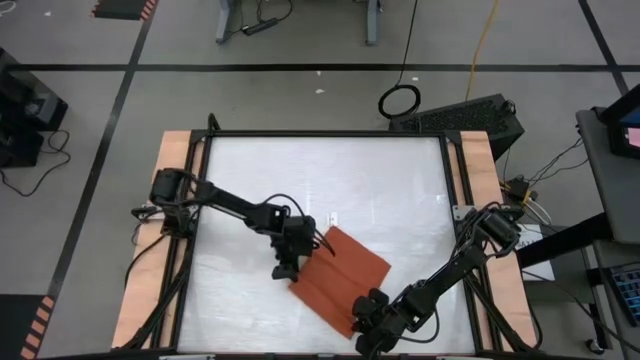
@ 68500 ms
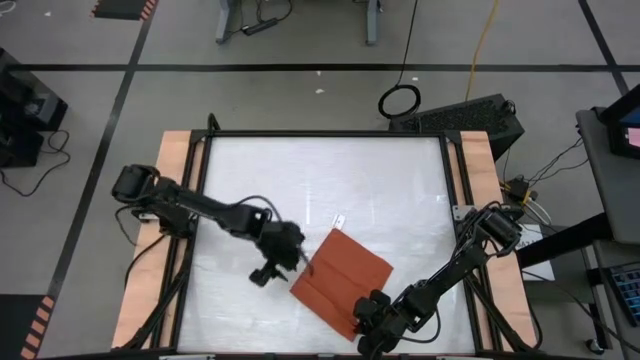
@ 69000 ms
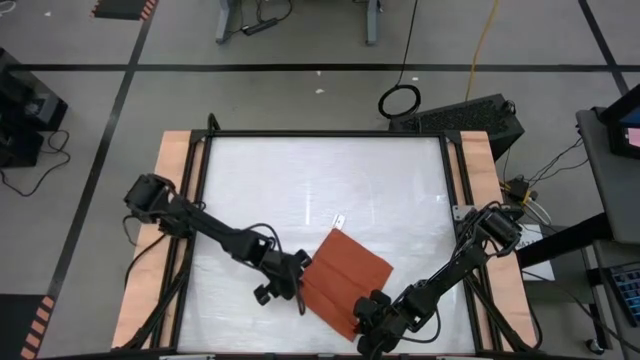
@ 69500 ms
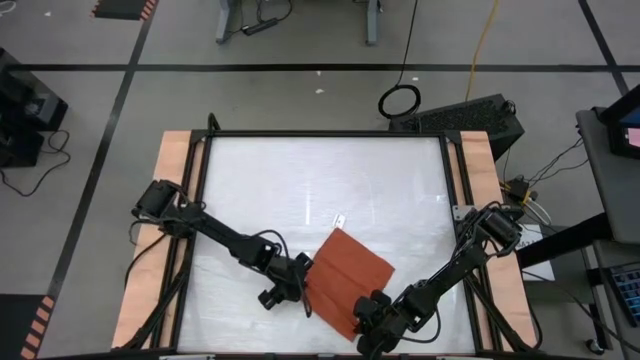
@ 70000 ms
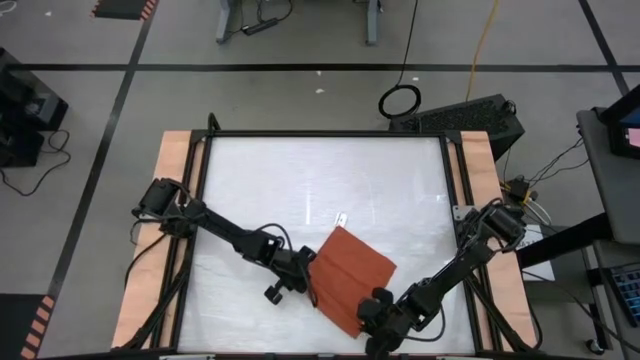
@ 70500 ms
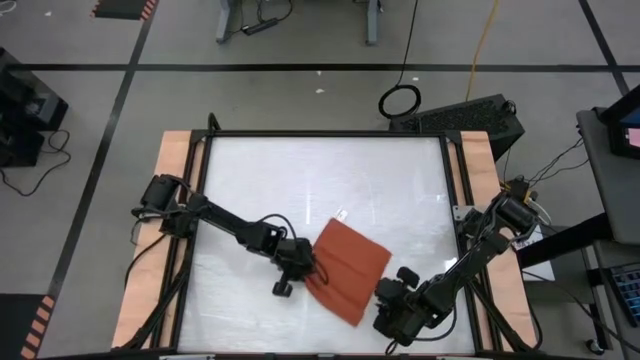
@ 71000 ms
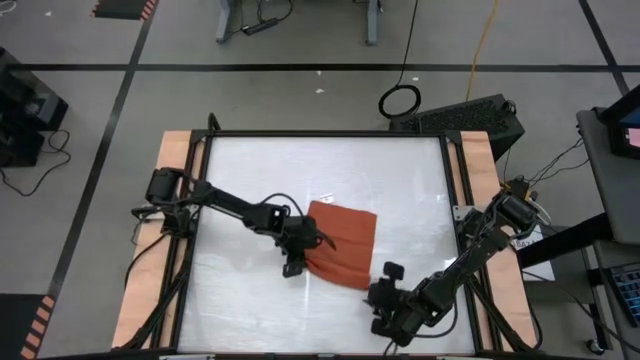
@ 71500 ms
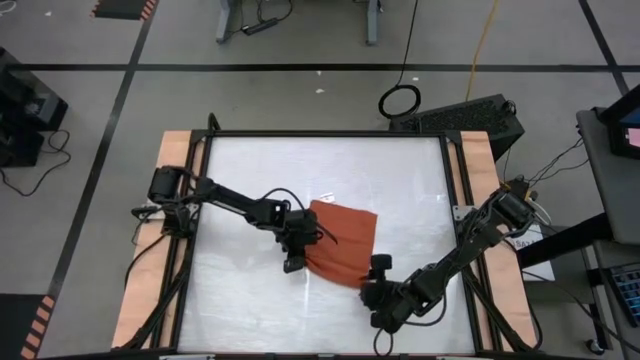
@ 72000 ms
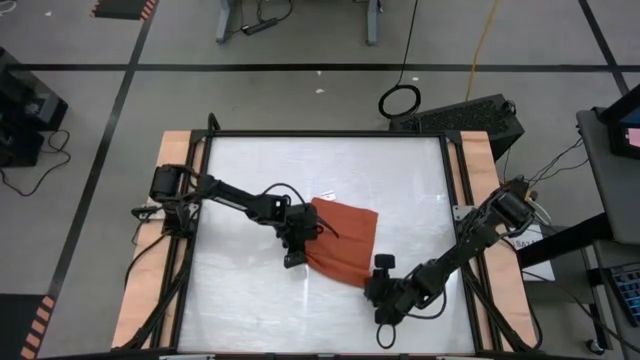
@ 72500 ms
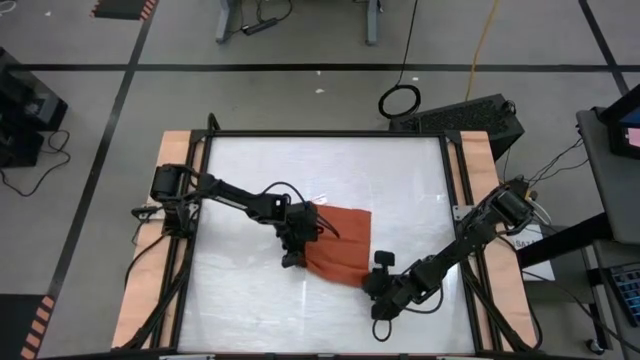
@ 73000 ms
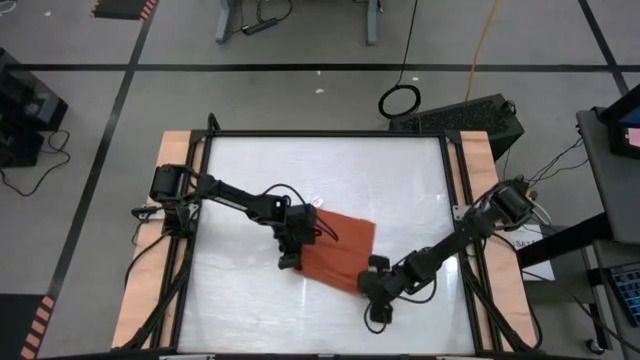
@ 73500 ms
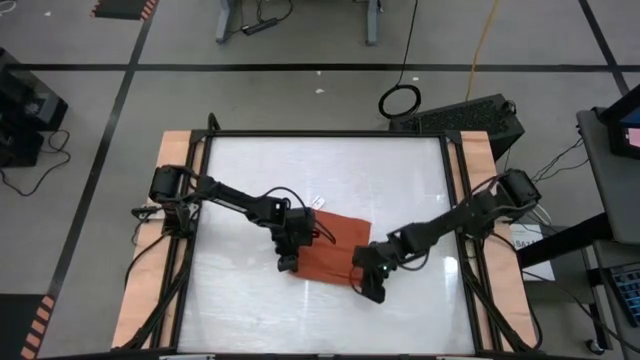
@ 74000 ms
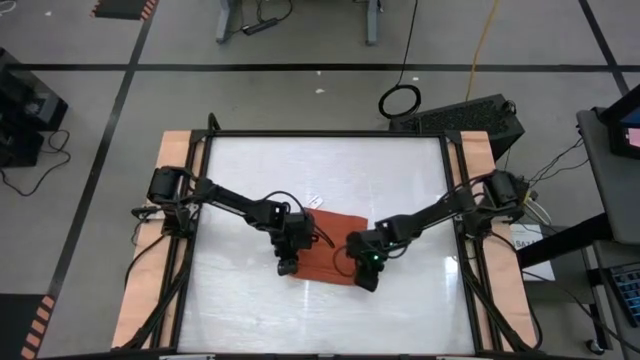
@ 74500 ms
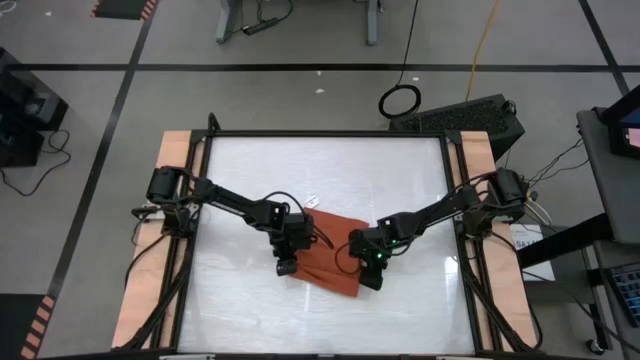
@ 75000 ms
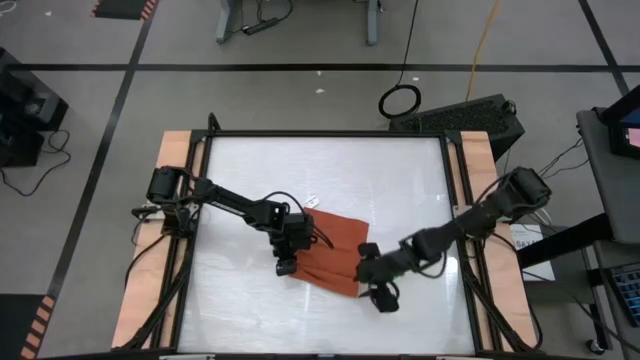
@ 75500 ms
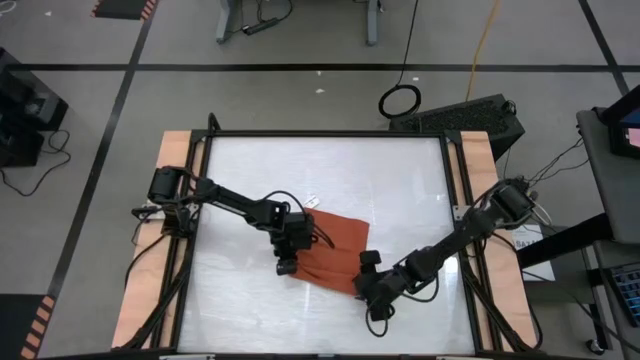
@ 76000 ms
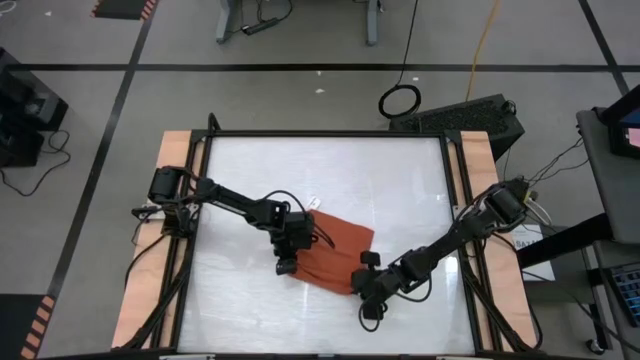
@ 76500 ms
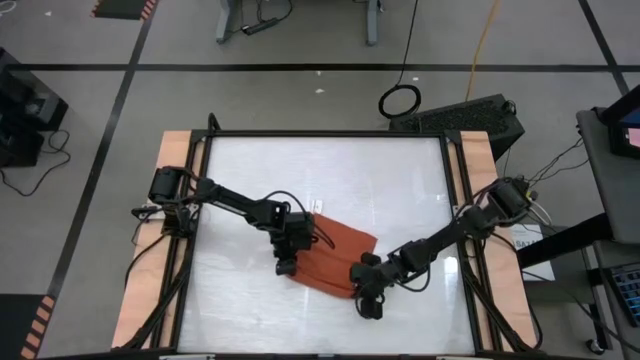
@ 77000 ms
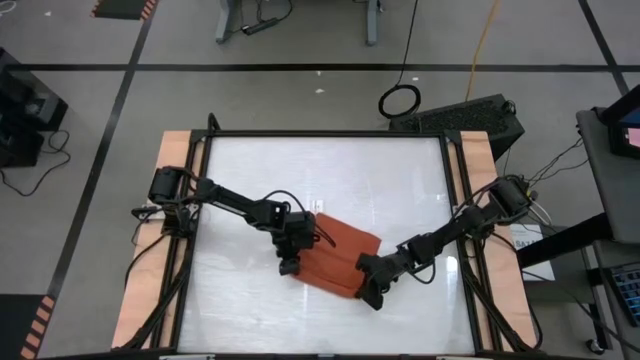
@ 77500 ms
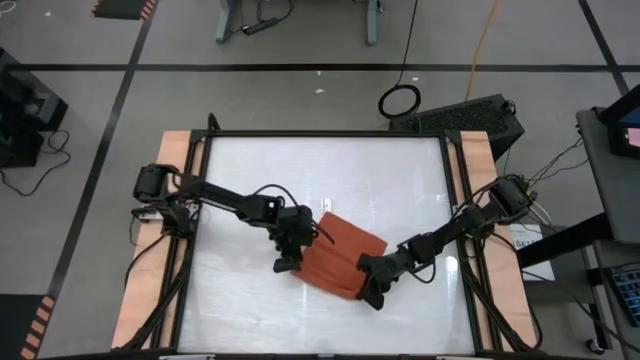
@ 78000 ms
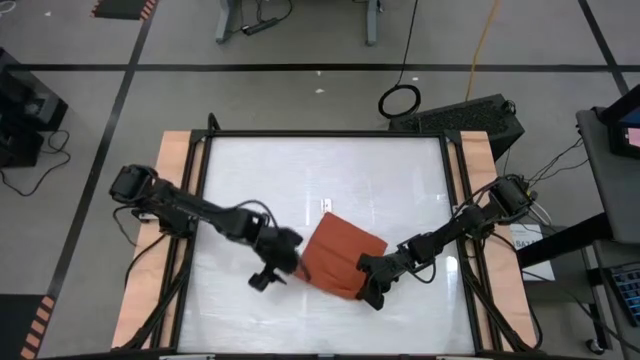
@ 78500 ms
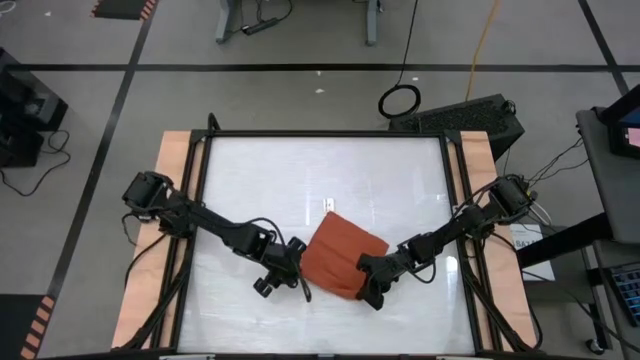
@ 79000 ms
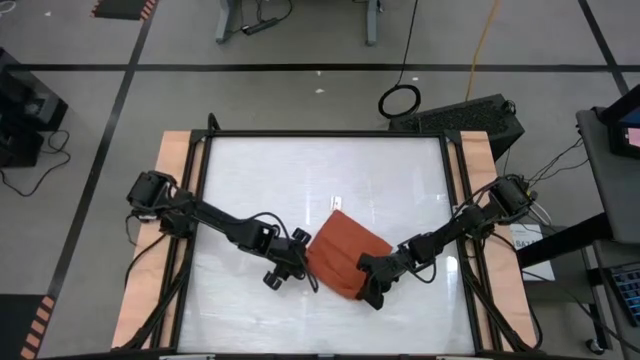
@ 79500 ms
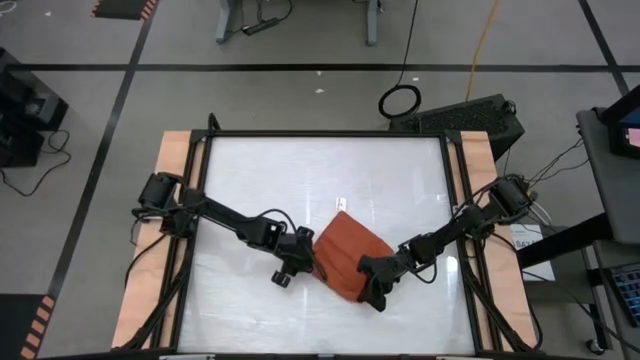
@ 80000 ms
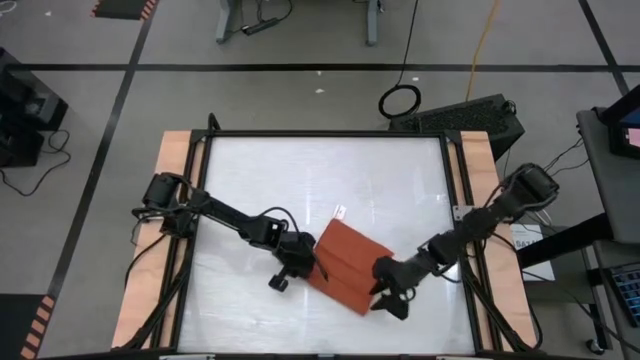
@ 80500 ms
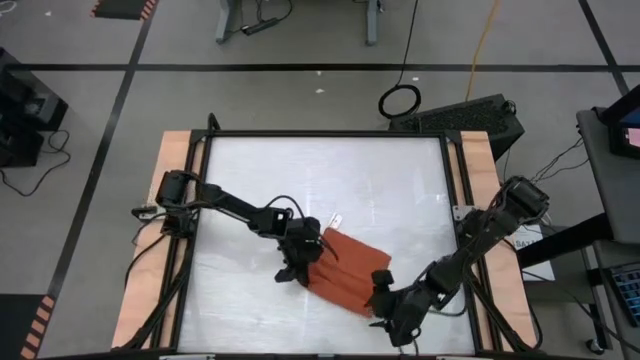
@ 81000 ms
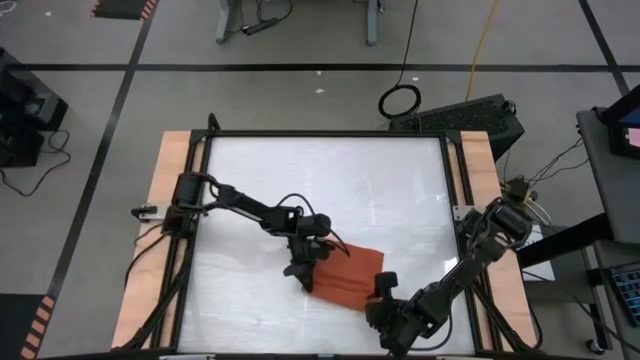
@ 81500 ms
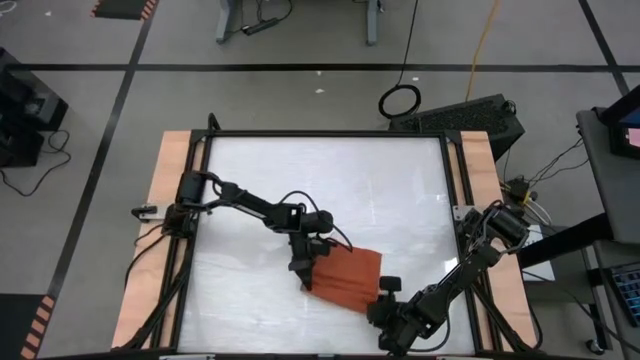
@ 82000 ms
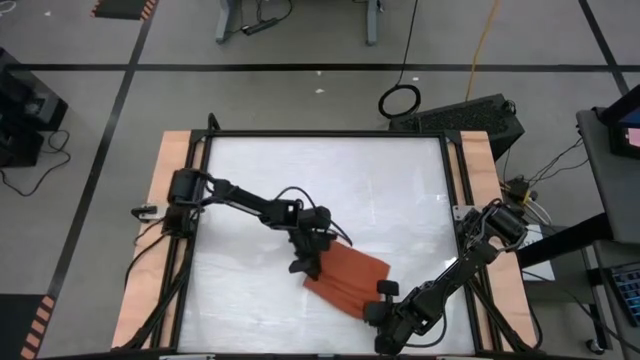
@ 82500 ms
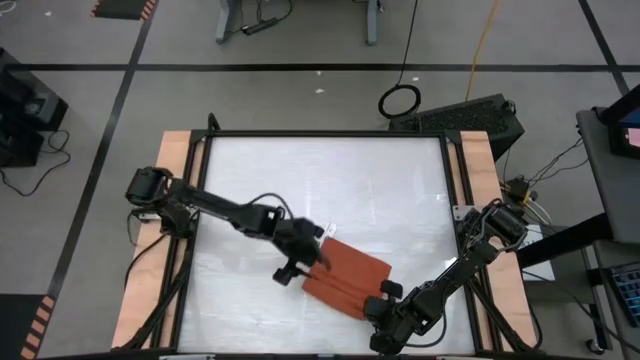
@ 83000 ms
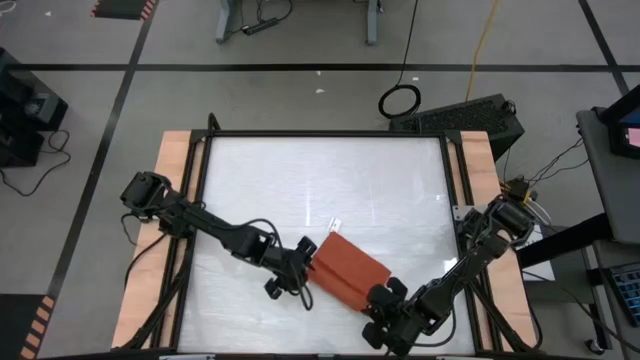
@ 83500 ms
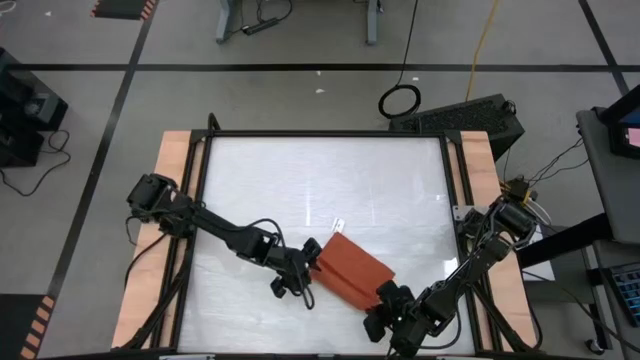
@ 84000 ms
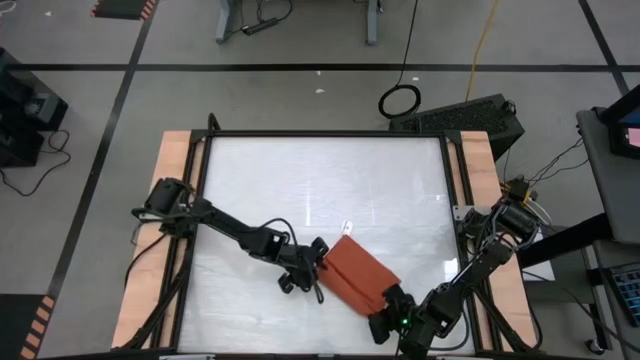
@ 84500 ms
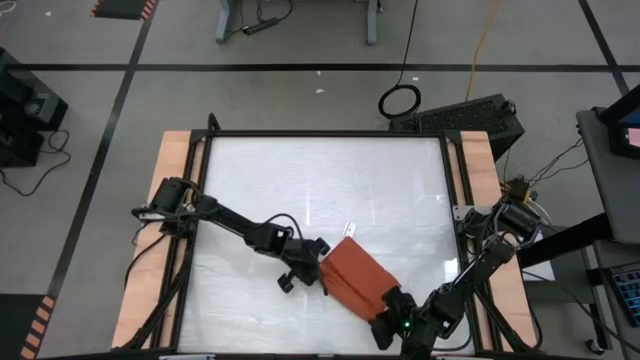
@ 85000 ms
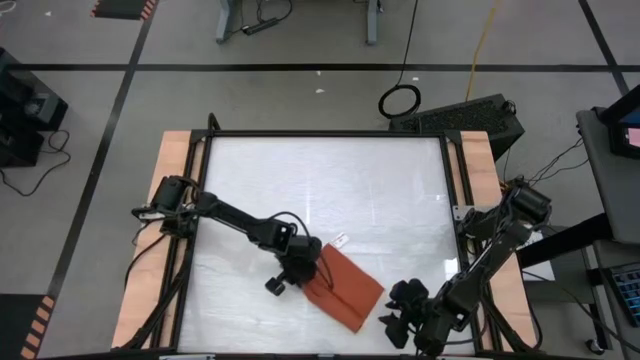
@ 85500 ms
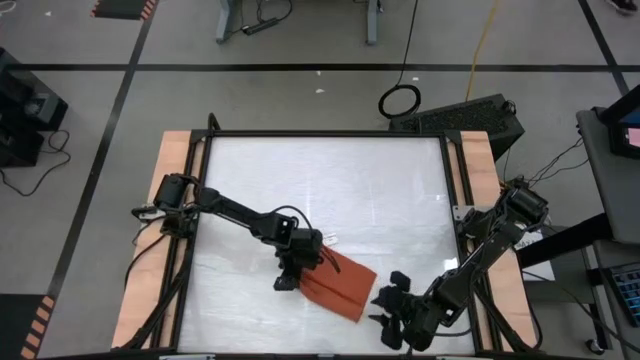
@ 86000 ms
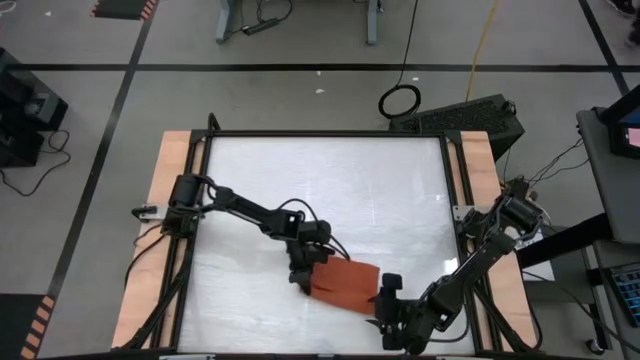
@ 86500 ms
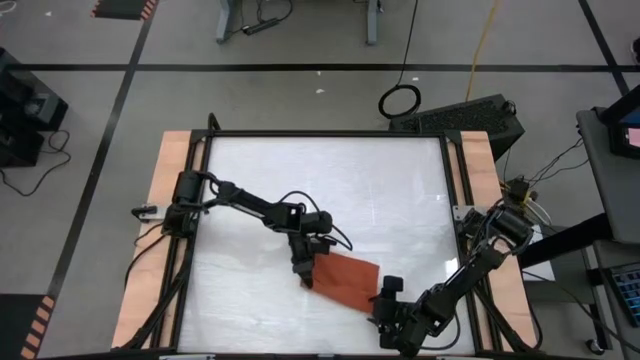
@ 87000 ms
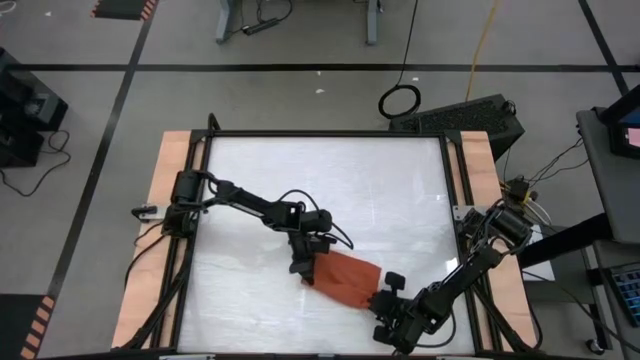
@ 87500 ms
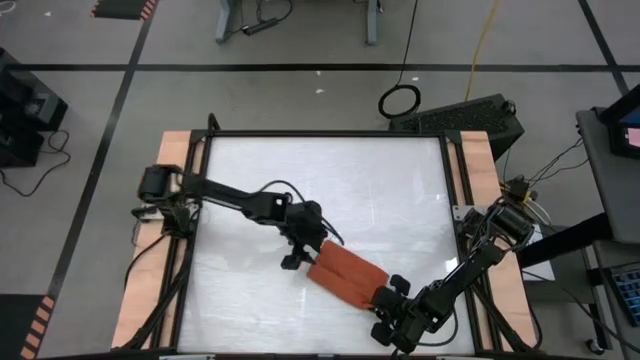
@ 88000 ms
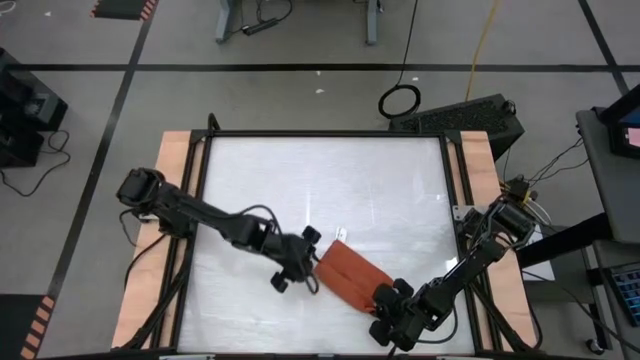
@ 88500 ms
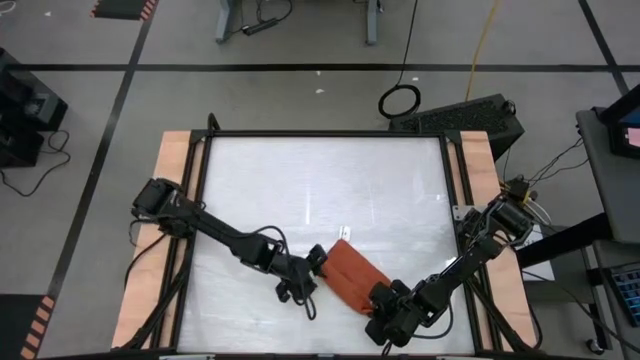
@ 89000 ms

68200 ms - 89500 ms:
Task: Roll towel
Roll the orange towel
